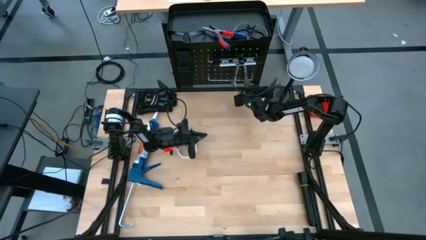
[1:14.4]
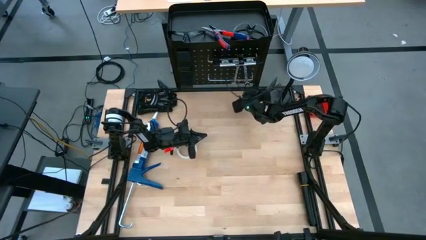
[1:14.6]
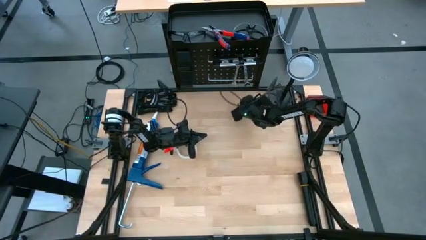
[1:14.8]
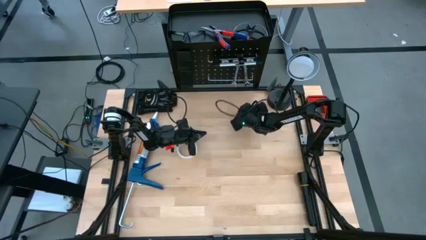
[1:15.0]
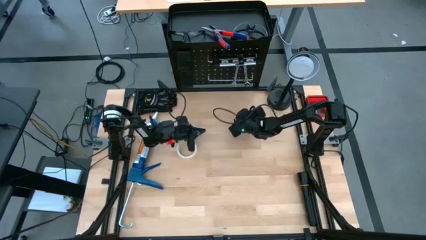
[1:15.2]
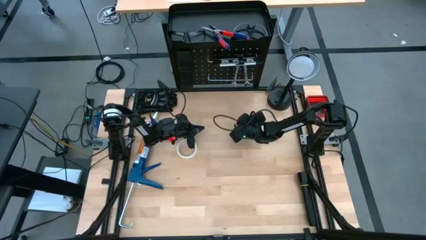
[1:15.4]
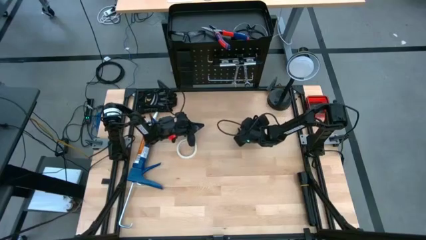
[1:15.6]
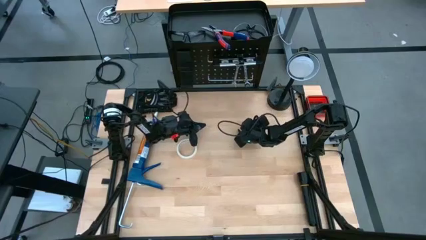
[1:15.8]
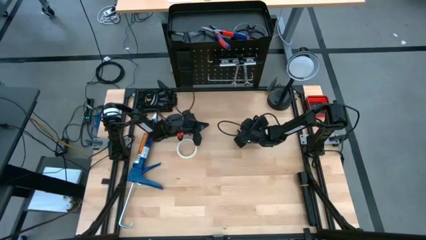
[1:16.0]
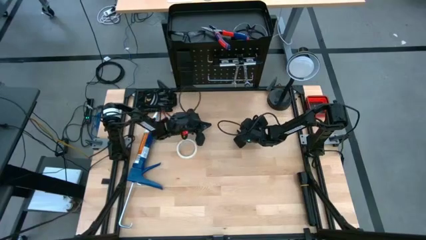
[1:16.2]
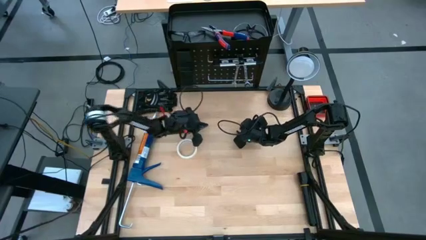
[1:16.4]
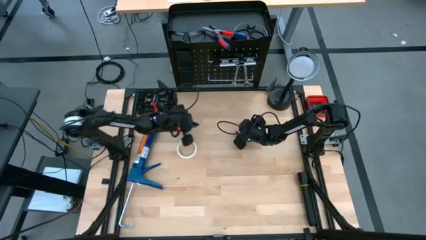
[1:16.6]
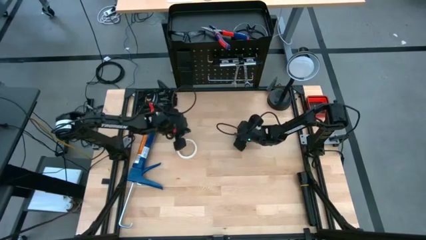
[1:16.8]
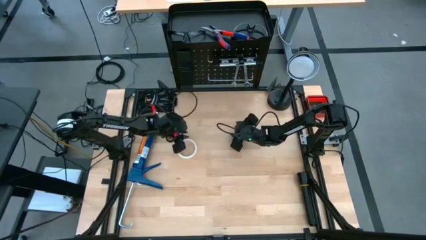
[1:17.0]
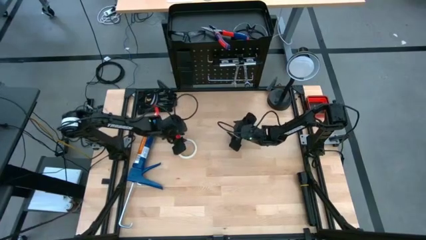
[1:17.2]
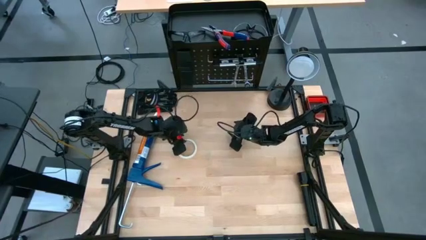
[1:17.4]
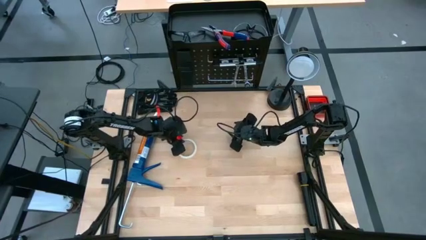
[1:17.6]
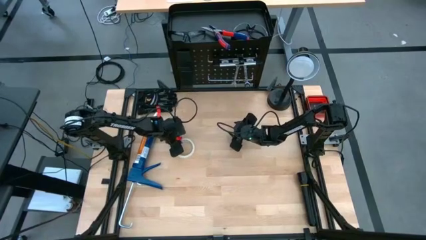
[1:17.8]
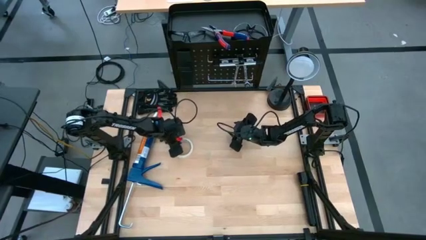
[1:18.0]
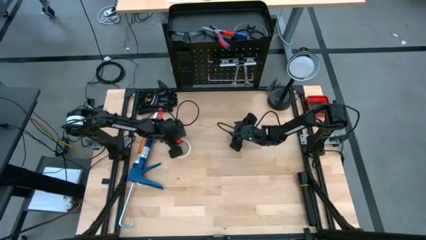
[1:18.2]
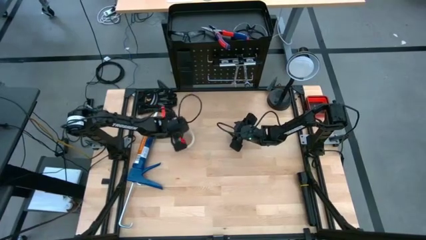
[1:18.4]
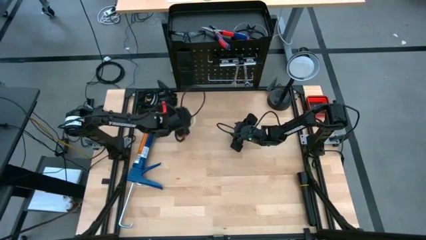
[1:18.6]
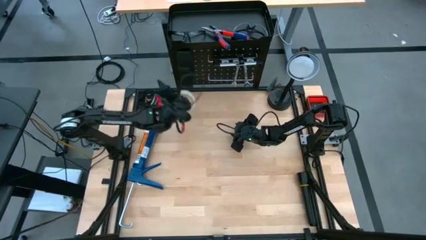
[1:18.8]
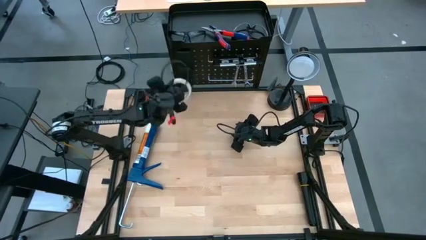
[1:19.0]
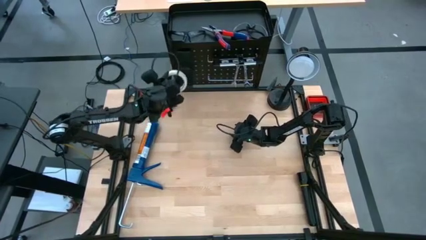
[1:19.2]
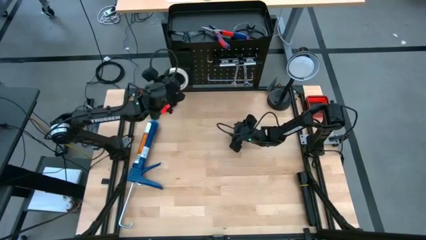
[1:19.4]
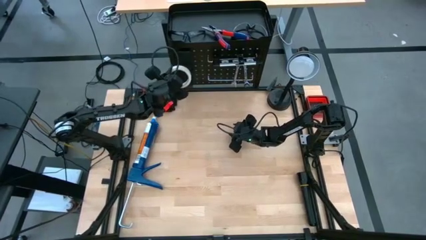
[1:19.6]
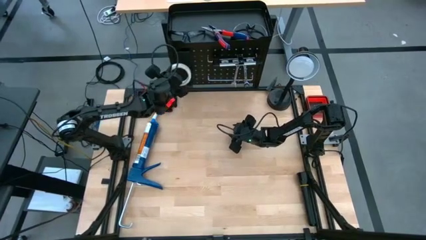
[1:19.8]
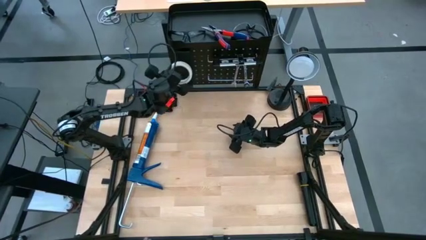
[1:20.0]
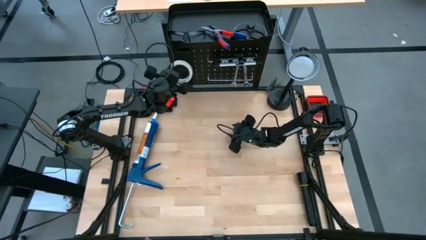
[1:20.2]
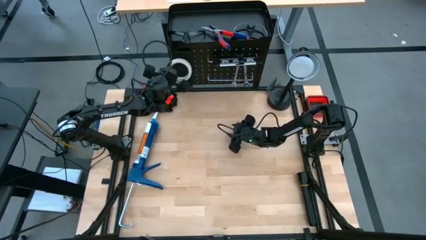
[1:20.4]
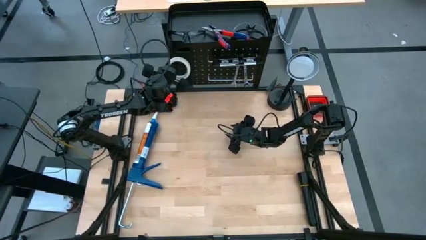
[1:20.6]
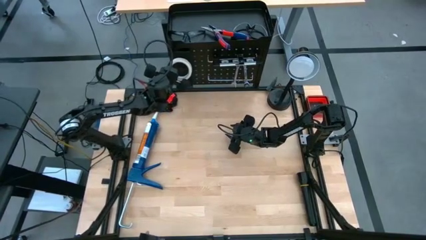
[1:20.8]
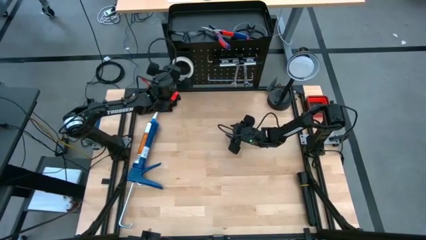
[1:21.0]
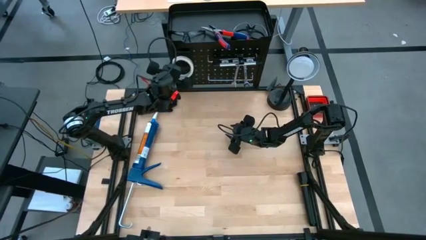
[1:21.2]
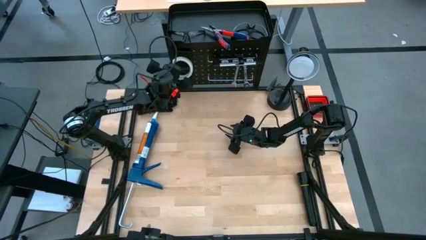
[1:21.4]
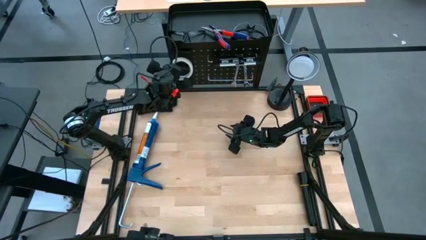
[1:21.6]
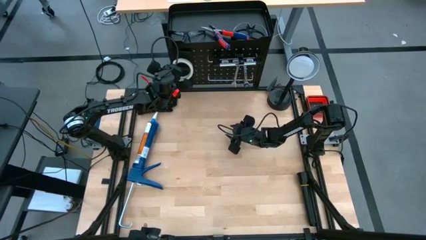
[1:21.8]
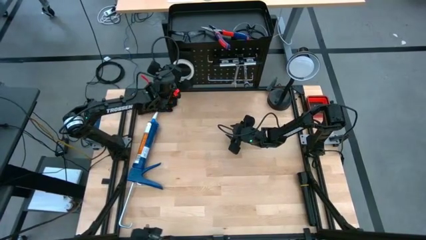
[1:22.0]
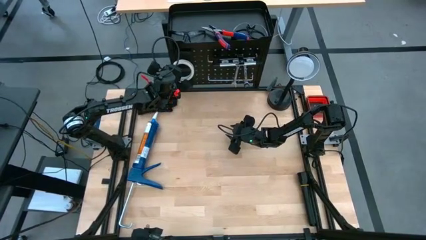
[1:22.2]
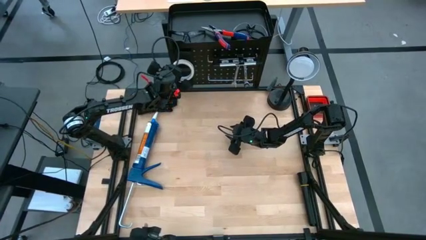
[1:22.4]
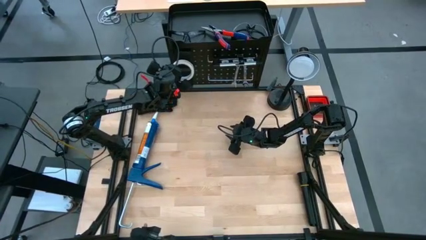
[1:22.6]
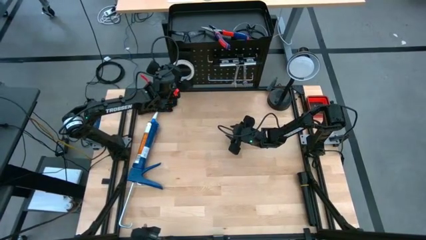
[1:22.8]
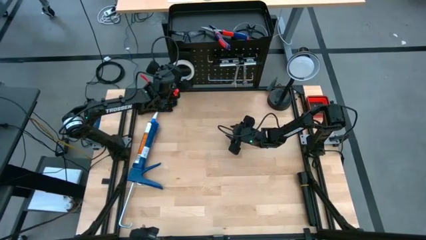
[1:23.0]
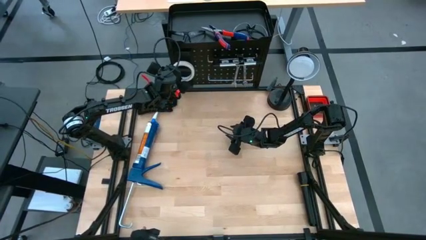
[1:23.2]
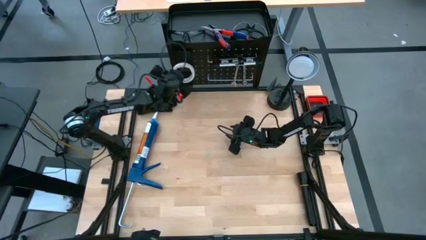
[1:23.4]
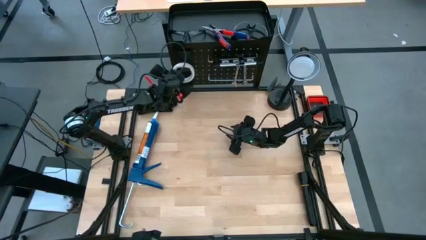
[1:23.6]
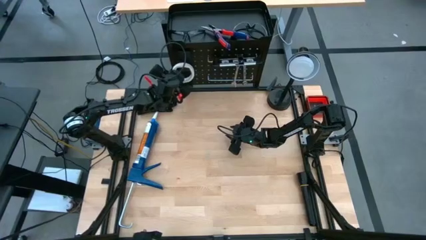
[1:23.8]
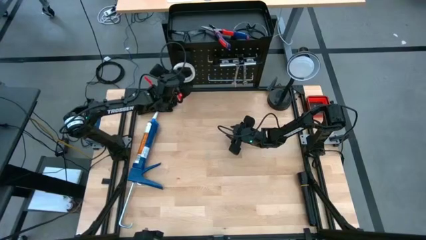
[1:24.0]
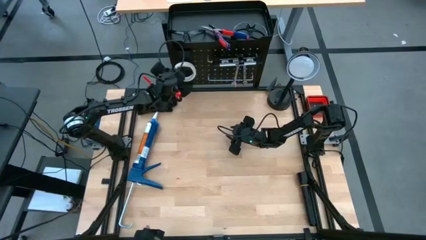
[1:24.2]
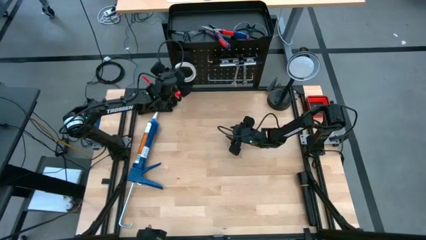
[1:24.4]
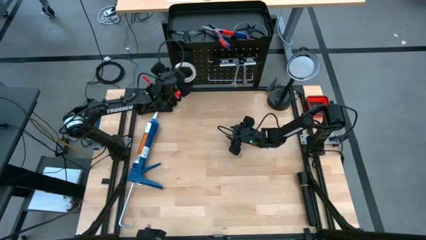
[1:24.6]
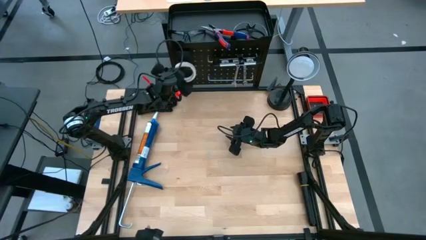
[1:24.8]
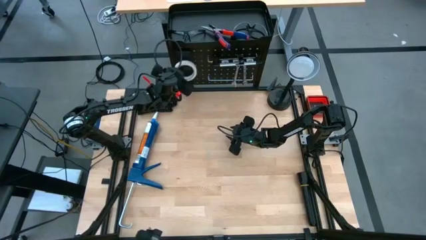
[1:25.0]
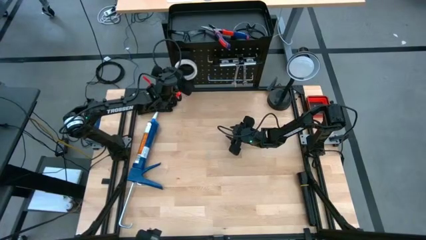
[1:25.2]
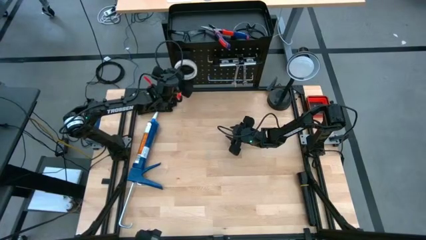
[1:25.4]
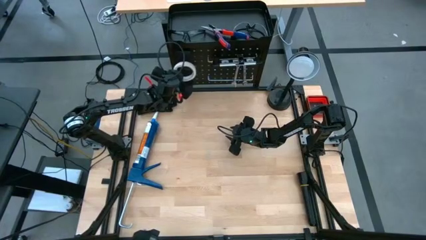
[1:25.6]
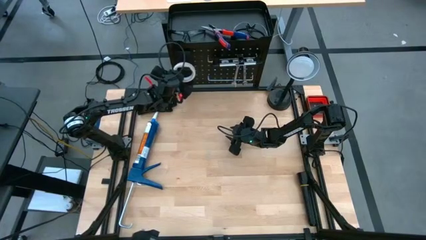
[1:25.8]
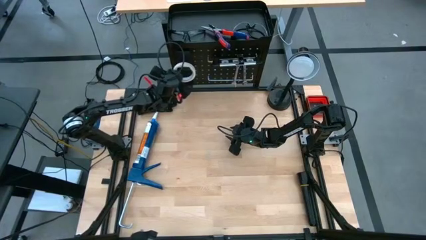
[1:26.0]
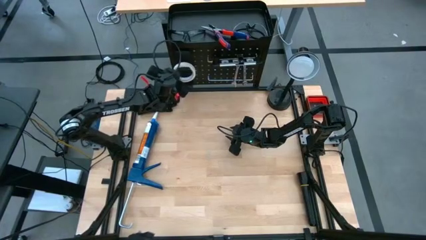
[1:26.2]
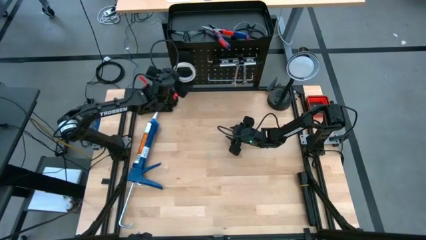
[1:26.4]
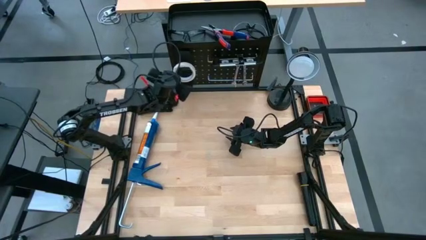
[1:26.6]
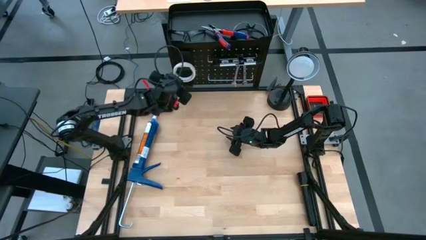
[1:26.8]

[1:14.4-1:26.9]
Task: Hang tools onto peg board
Hang the white tape into the black peg board

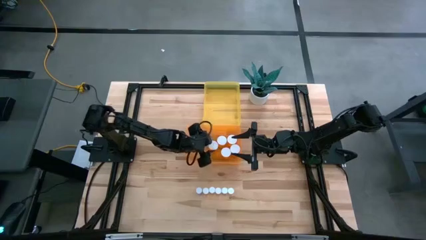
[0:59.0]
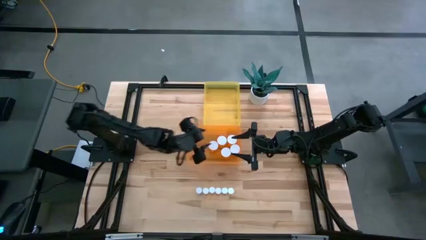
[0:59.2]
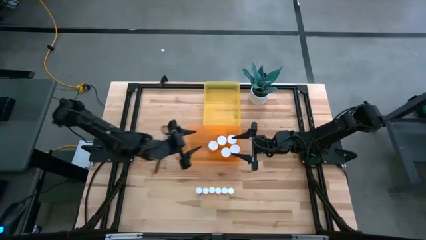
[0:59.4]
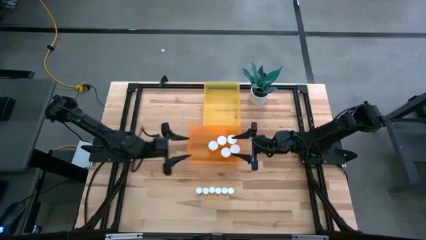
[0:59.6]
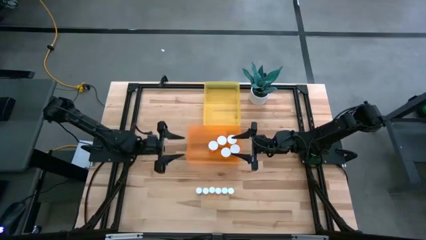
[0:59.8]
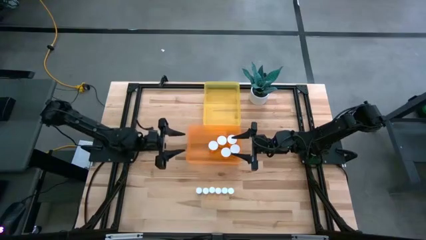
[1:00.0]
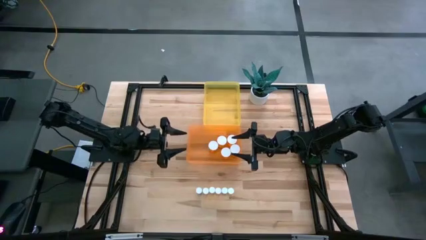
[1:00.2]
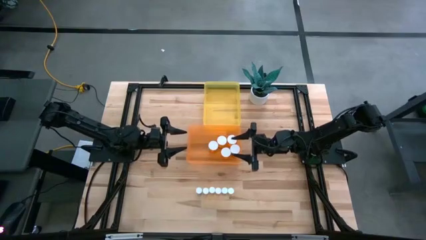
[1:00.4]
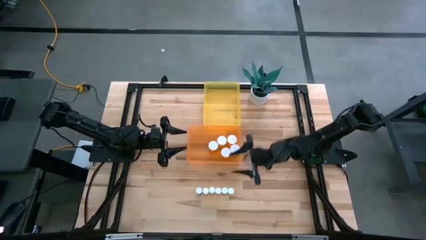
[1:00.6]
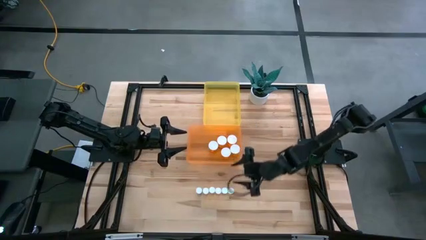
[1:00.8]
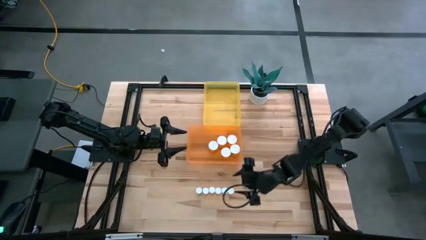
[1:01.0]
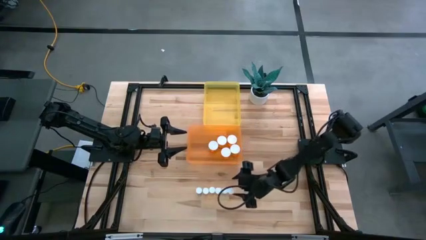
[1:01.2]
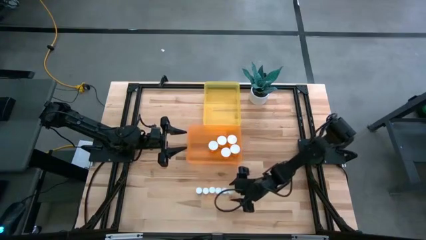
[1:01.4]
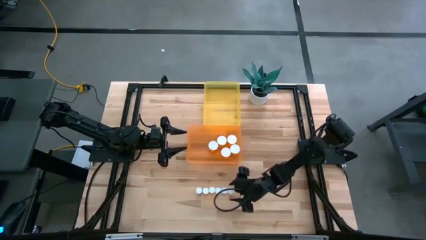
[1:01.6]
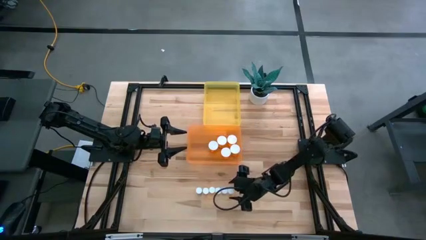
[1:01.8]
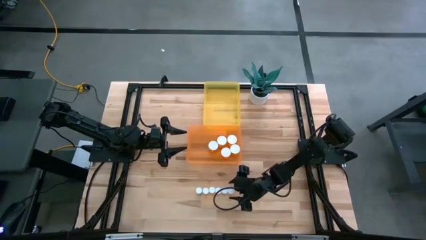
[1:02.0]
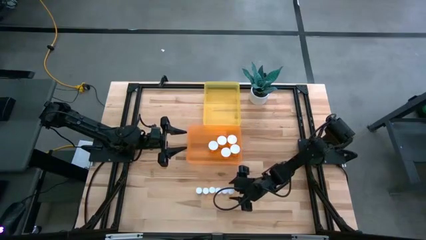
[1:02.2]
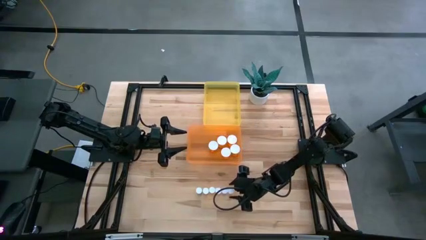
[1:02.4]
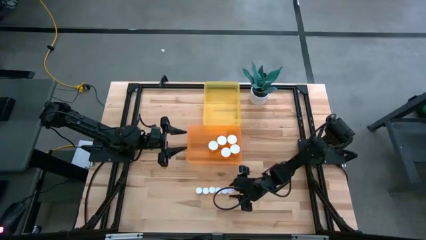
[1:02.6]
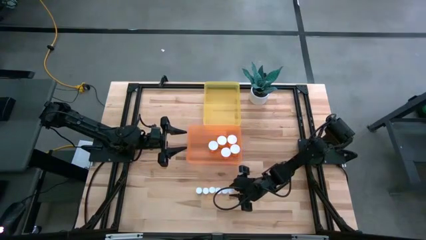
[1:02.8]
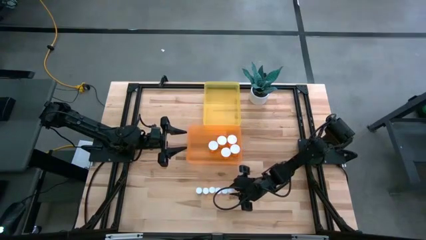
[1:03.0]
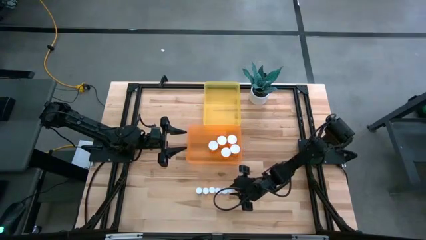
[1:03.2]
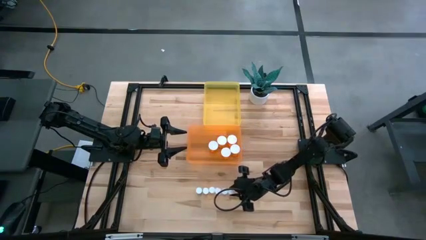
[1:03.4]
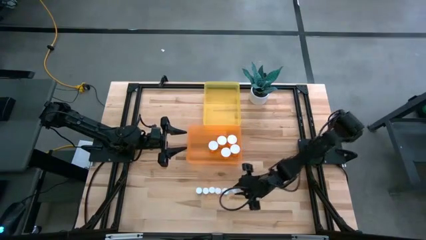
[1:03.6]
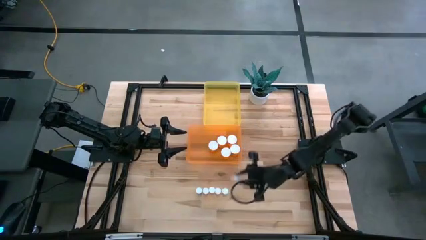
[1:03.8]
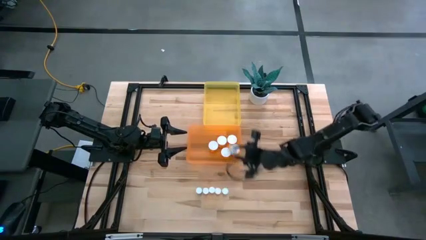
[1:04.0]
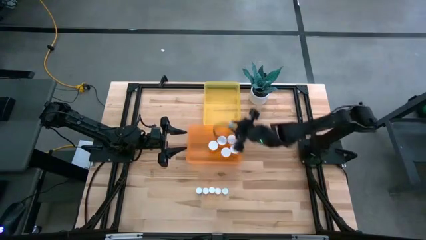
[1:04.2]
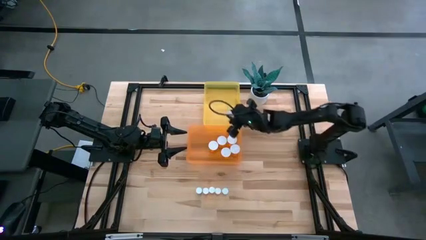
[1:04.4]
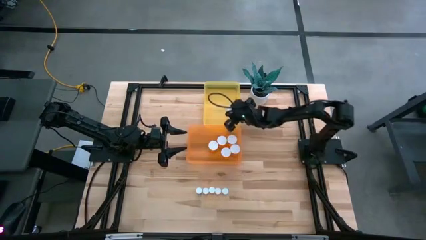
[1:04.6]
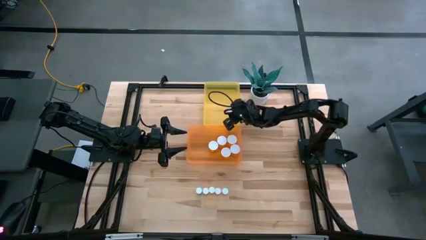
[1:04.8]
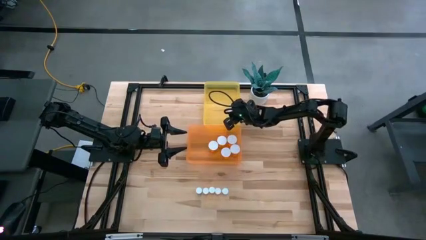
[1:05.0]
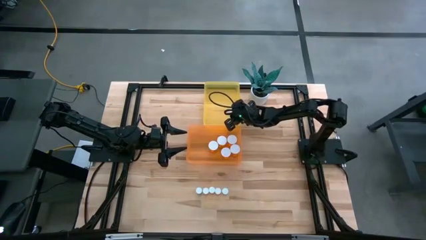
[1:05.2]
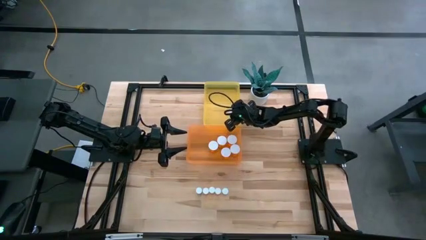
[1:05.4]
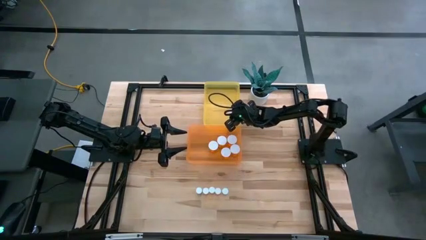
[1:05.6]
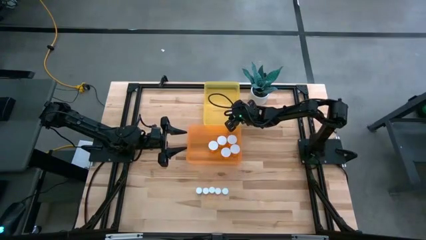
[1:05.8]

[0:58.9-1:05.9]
Task: Pick and place medicine bottles into bin by pill shape (circle, oval)
Put the small yellow pill bottle into the yellow bin
